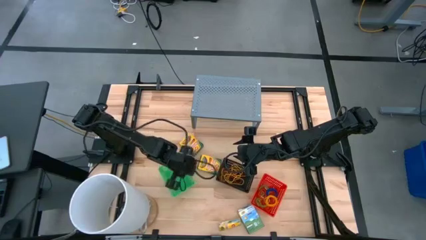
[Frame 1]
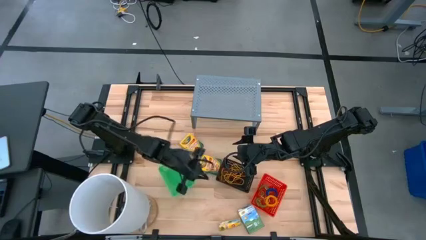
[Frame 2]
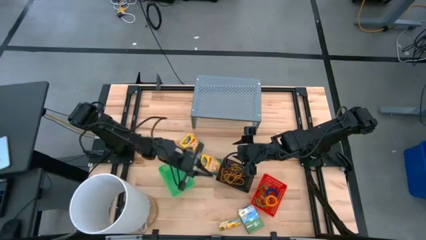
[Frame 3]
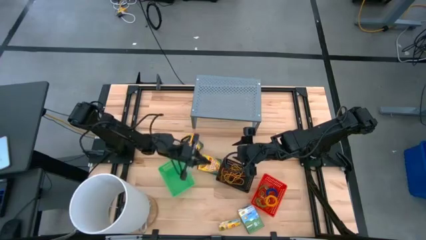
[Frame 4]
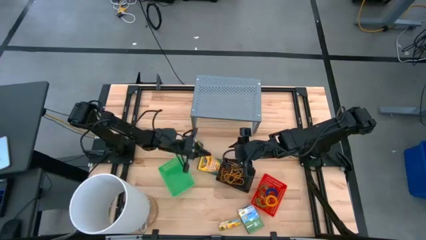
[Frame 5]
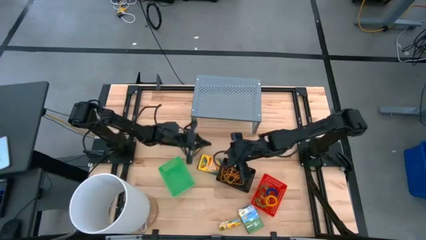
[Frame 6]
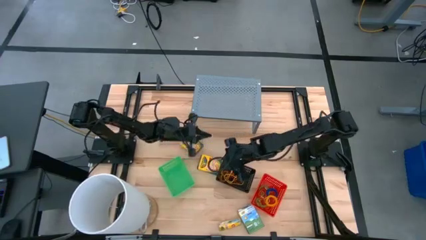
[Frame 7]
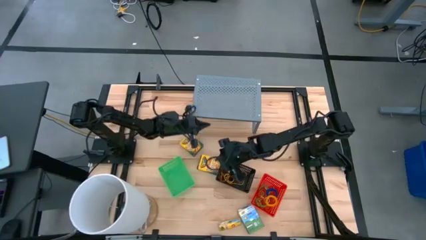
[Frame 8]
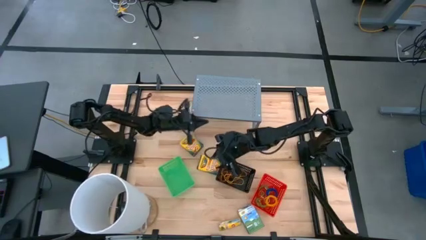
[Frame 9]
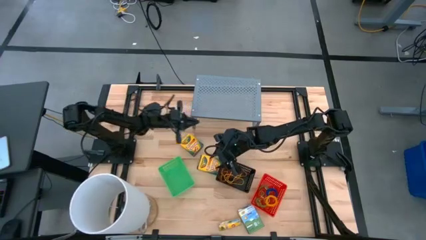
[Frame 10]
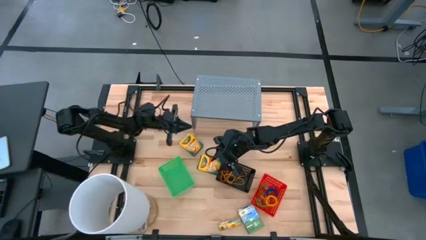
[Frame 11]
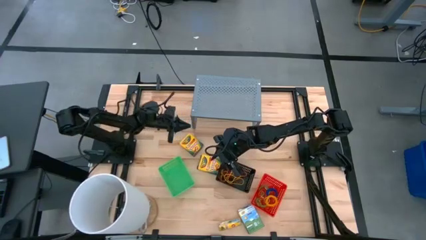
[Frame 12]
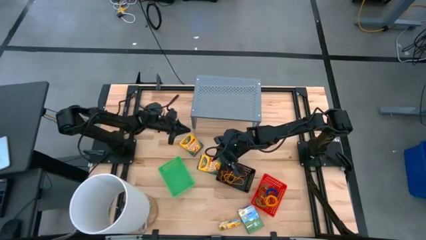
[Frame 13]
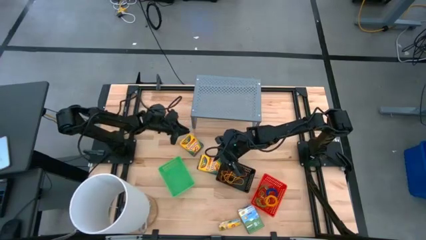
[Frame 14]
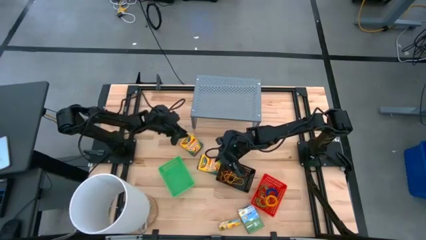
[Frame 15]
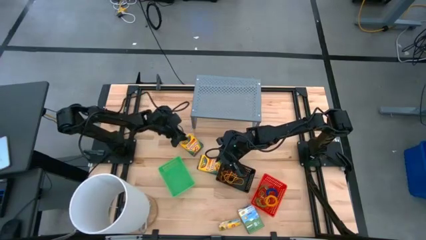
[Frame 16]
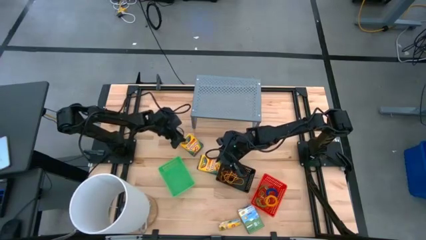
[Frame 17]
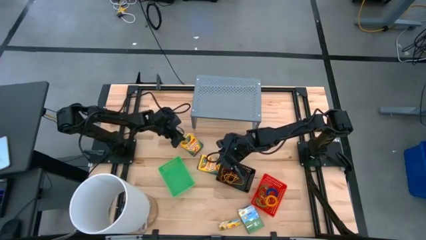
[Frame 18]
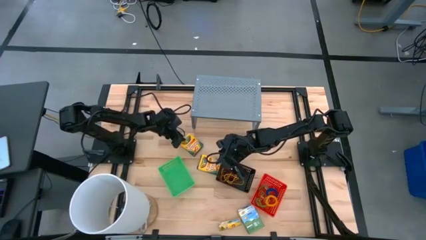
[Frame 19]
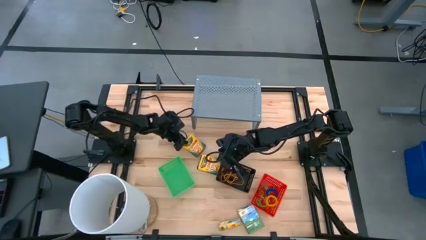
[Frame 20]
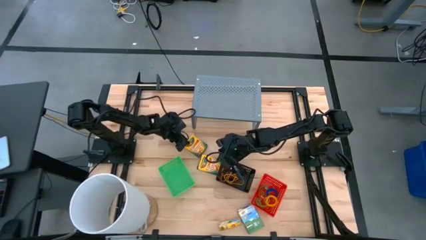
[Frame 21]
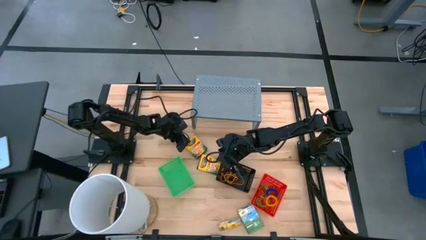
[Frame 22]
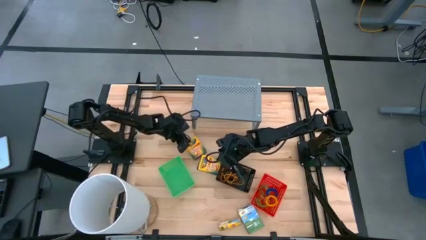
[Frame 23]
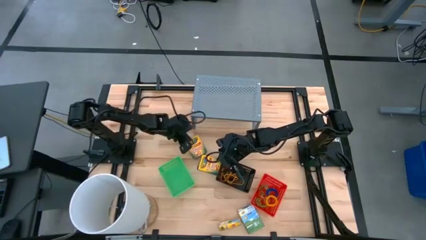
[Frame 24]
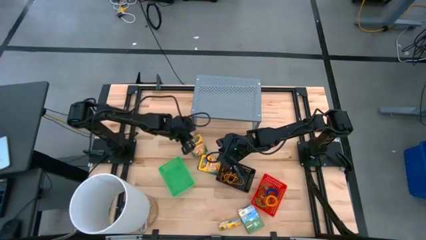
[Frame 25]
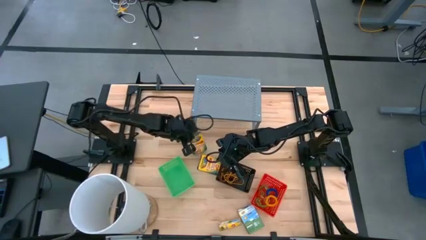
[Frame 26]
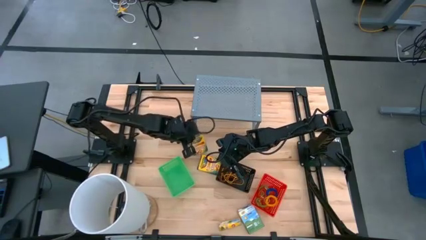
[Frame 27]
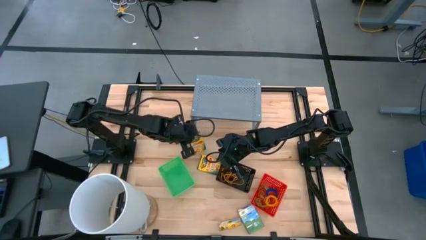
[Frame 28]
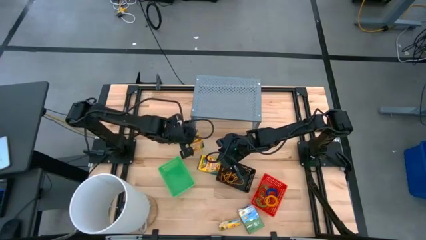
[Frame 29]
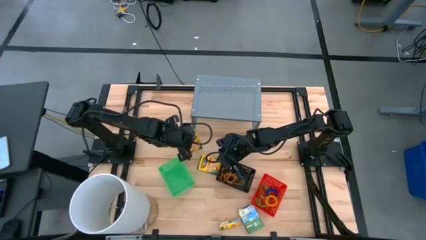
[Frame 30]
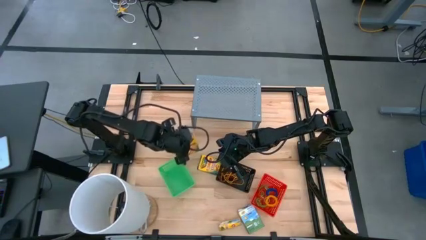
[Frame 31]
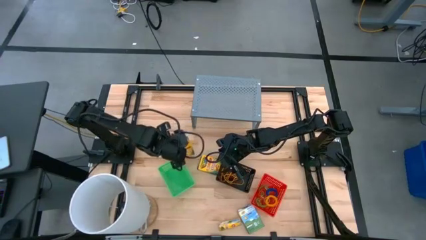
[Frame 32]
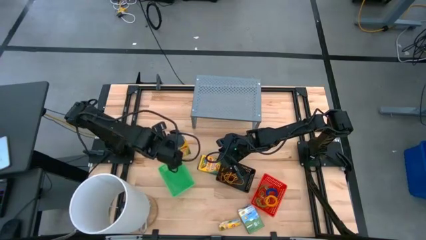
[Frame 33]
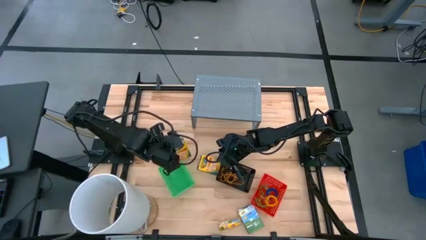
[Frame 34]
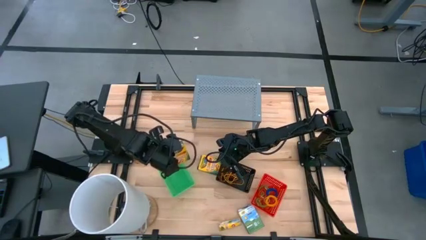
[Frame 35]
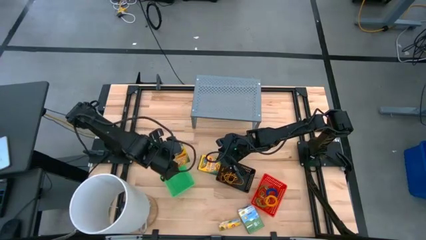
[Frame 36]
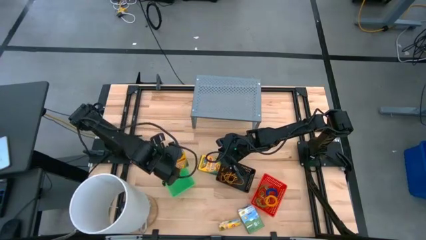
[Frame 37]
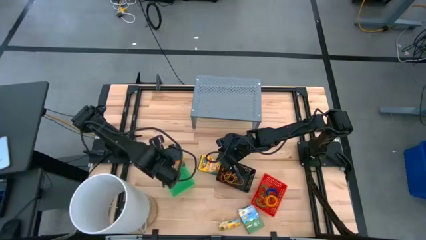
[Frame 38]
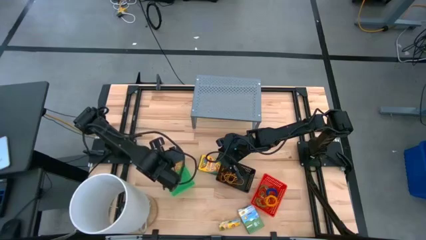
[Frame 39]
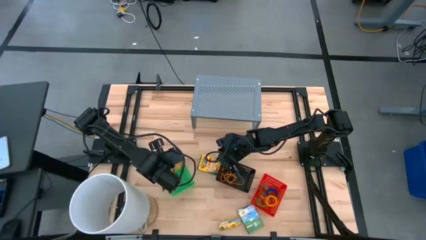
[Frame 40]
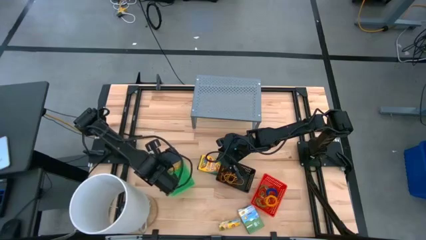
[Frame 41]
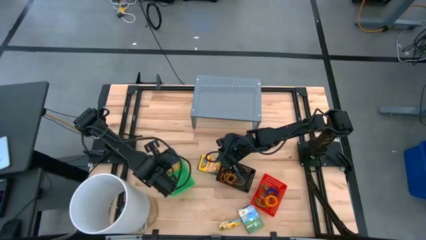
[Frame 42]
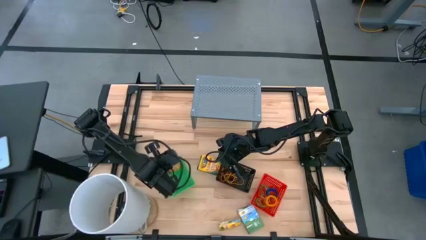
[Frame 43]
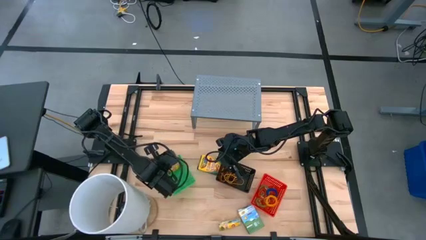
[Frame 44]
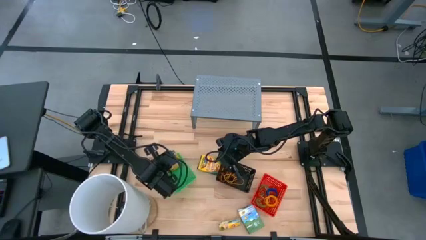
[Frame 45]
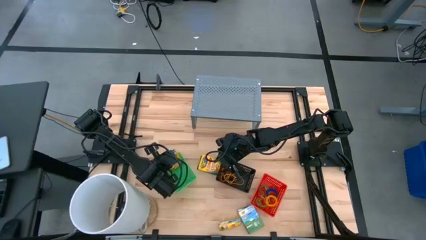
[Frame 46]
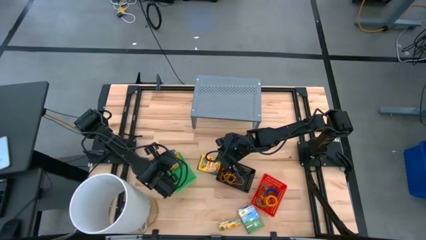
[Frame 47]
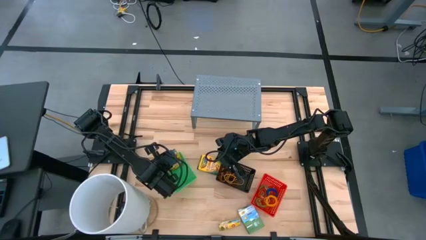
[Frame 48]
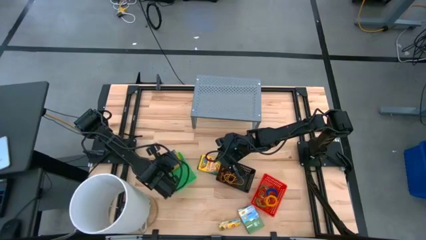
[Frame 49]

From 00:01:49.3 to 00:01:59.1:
Task: Pick & Place Office Desk Supplies
Put the yellow crayon box into the green bin

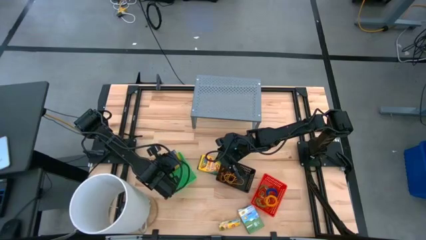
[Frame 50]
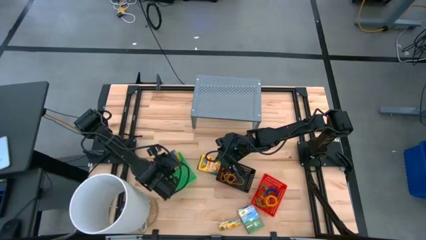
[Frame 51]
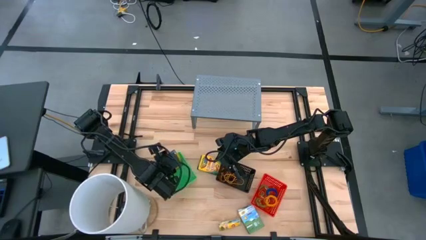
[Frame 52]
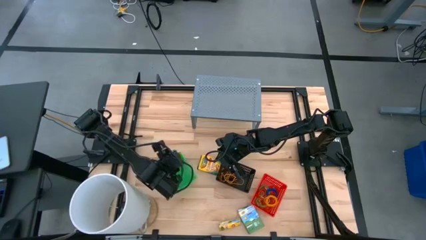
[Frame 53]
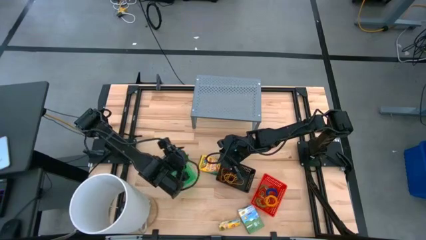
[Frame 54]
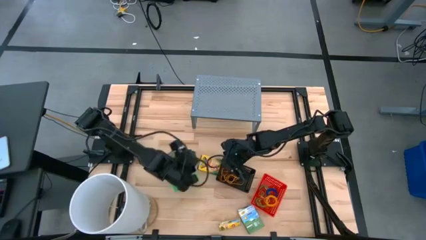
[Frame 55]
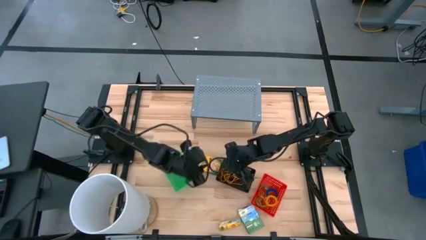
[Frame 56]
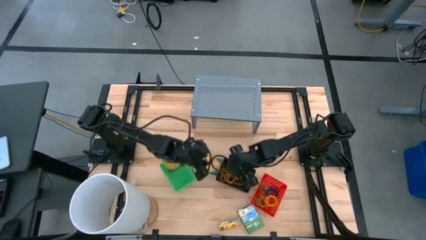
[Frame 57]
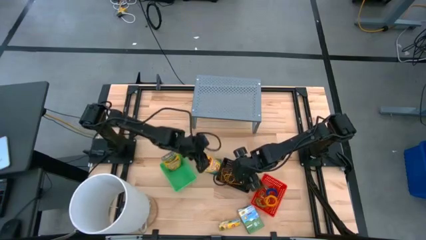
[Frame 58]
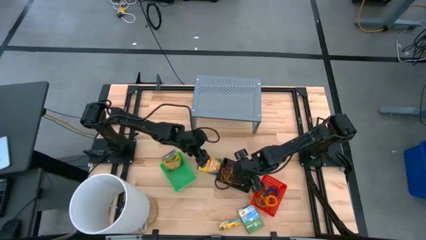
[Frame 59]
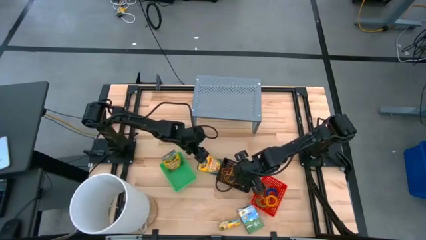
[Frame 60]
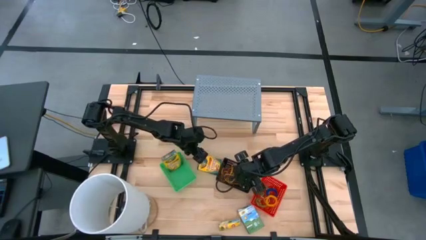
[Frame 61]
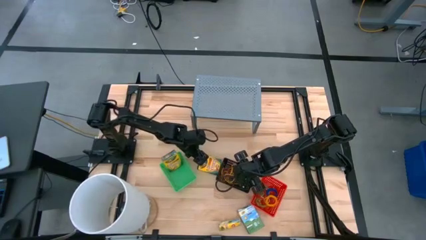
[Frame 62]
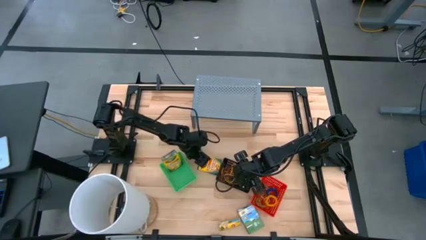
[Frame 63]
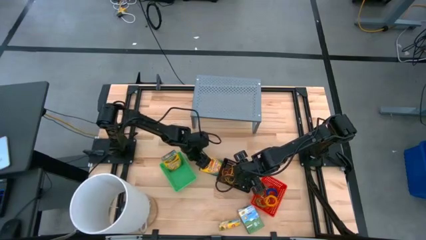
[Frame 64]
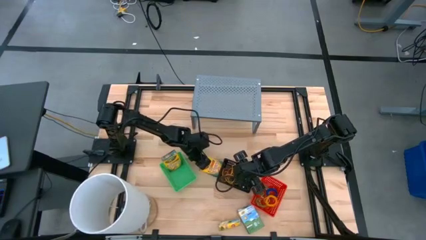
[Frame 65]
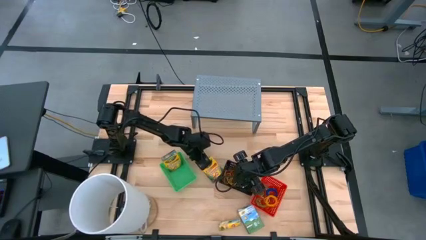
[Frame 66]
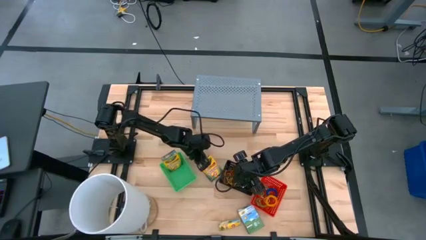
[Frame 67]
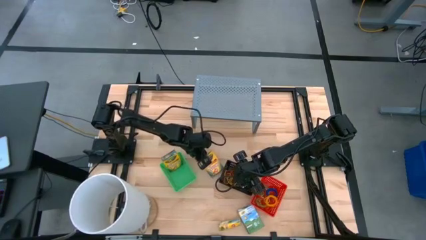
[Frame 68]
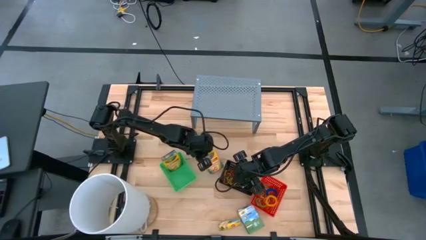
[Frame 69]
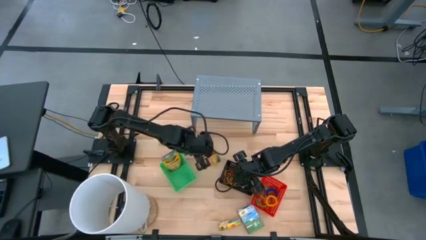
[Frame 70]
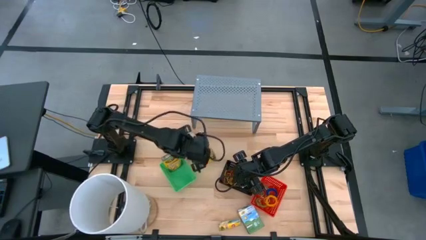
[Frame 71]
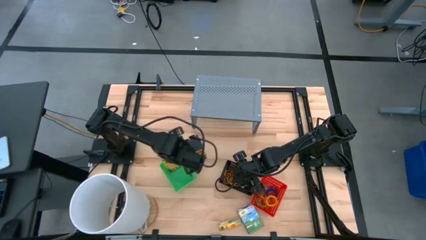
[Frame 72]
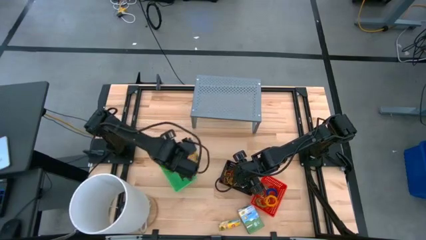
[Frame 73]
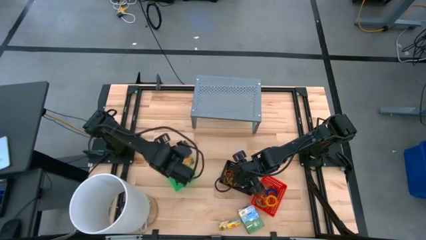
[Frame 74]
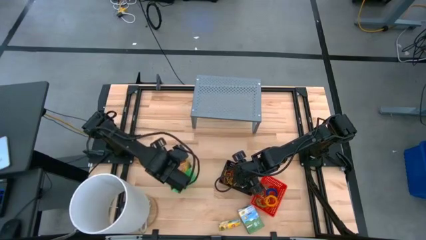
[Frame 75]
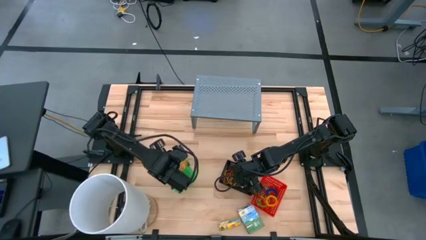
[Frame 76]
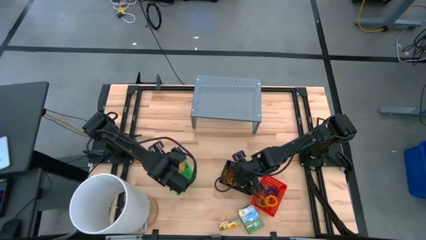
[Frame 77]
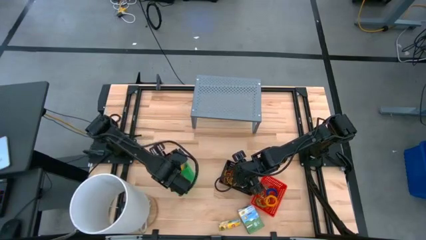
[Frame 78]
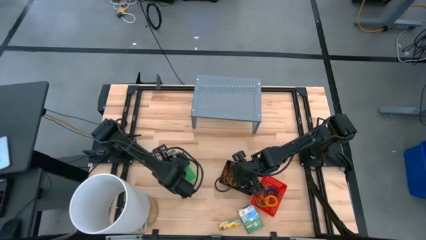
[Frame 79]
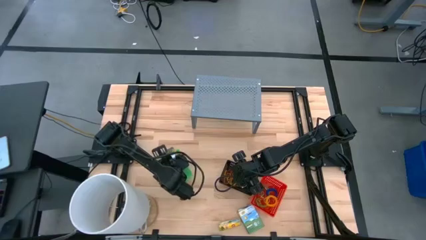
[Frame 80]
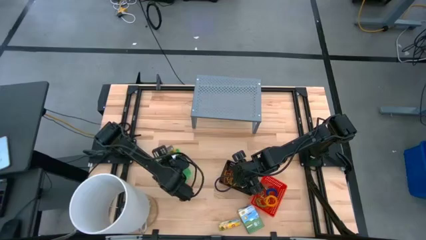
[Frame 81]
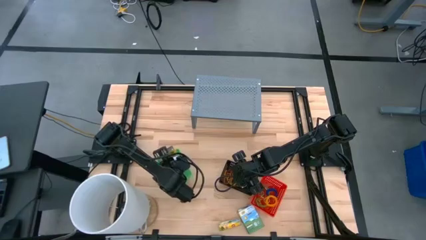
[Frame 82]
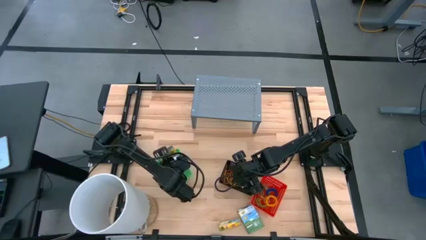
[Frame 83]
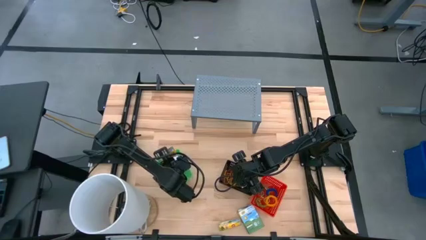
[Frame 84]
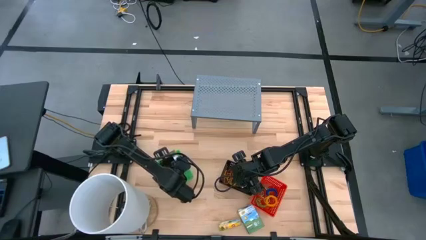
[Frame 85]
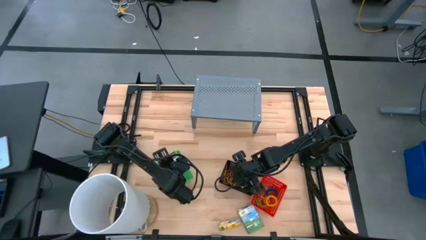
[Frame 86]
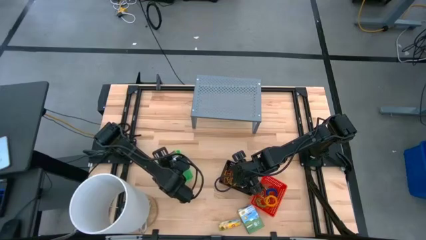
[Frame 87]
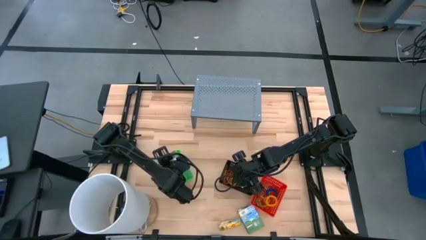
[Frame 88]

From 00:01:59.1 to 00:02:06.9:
Put the yellow crayon box into the green bin
